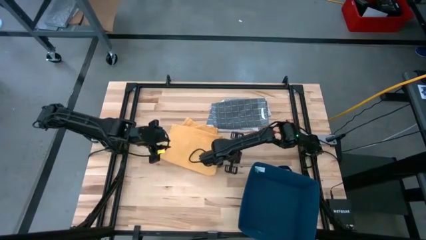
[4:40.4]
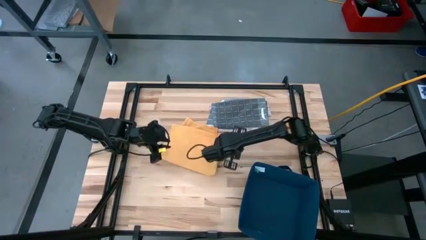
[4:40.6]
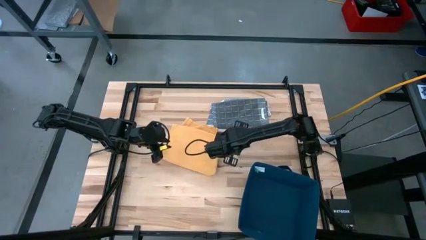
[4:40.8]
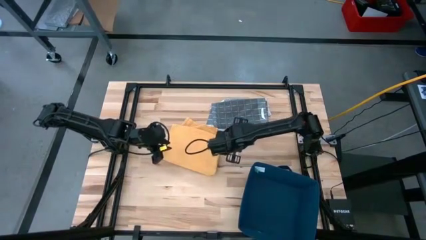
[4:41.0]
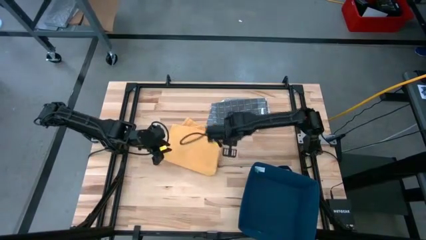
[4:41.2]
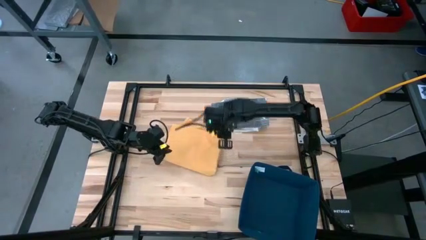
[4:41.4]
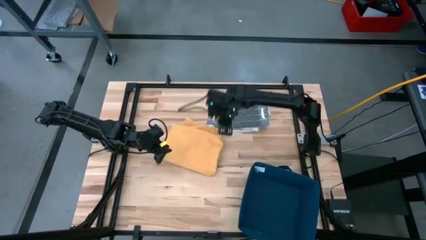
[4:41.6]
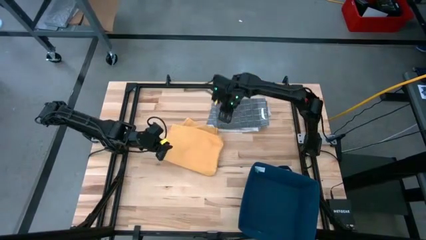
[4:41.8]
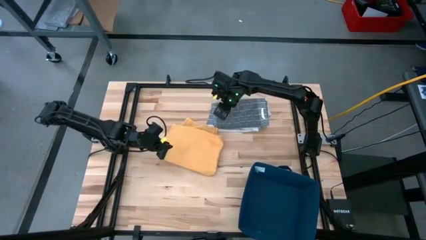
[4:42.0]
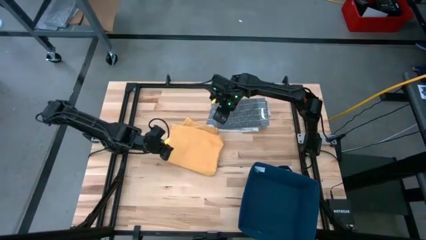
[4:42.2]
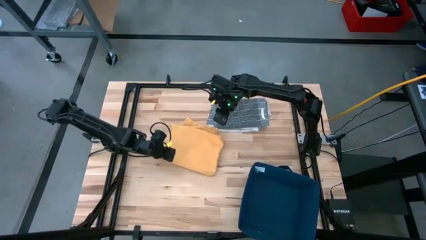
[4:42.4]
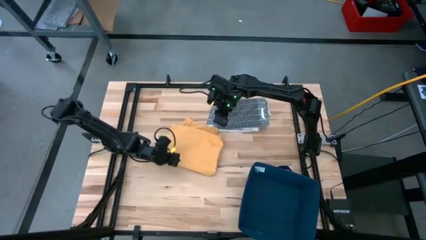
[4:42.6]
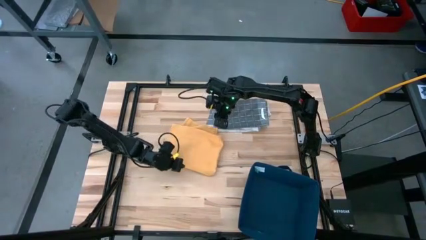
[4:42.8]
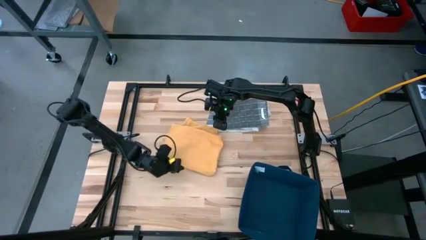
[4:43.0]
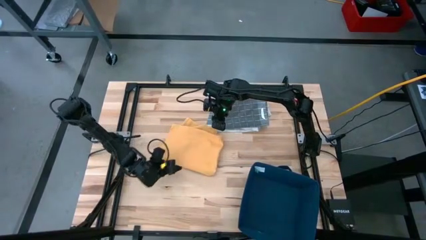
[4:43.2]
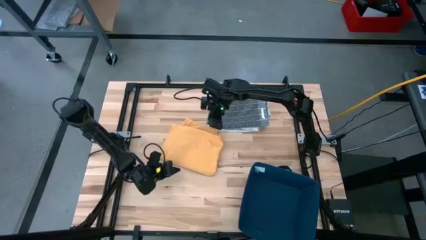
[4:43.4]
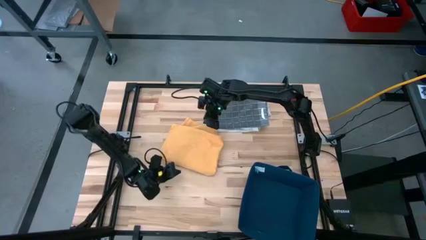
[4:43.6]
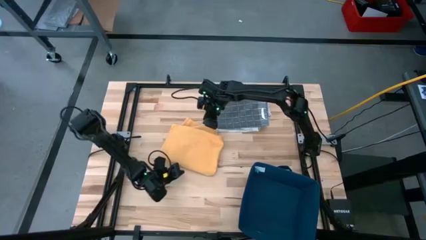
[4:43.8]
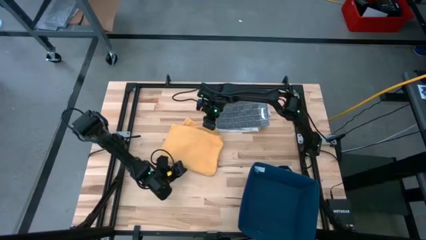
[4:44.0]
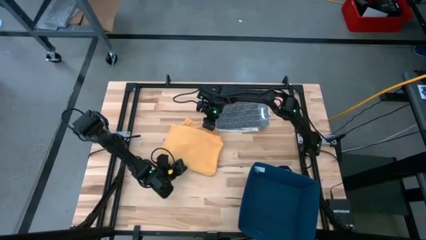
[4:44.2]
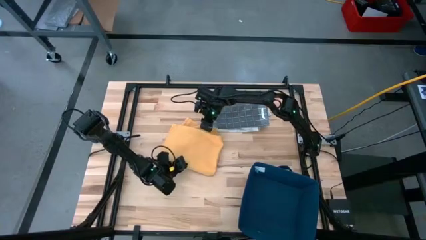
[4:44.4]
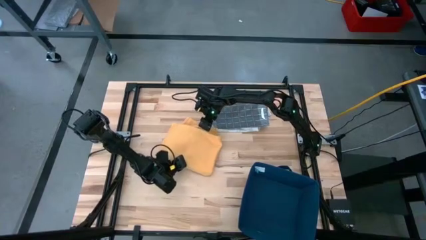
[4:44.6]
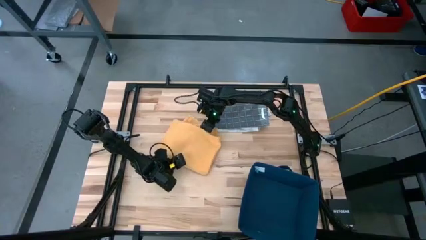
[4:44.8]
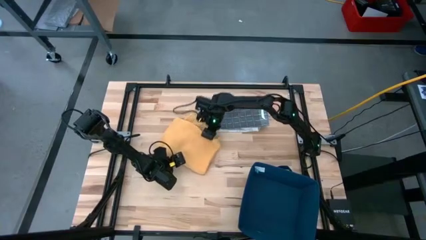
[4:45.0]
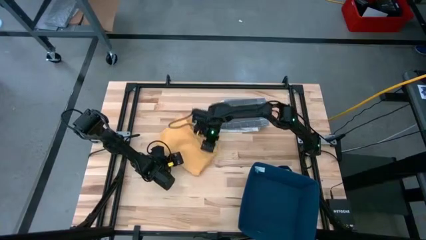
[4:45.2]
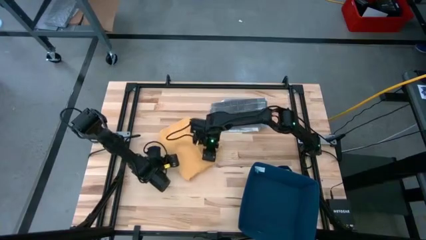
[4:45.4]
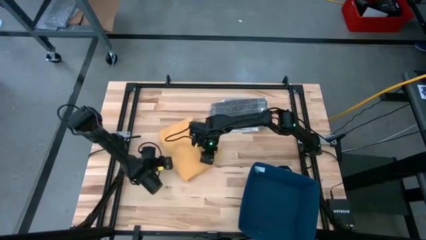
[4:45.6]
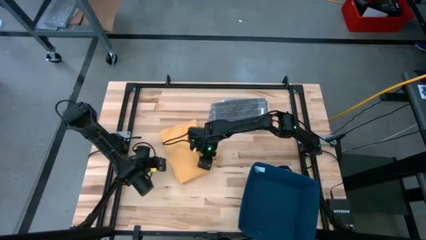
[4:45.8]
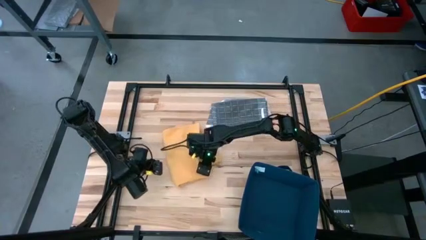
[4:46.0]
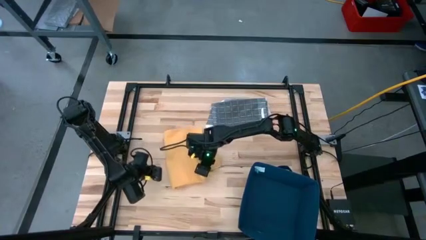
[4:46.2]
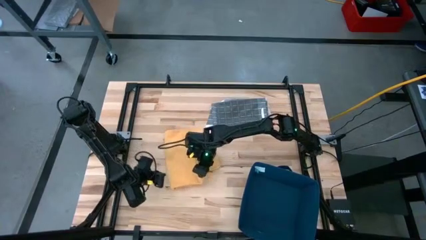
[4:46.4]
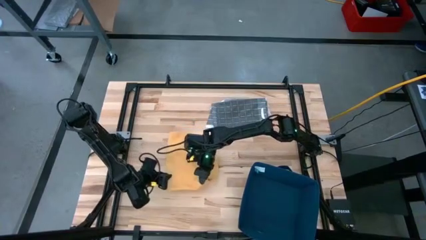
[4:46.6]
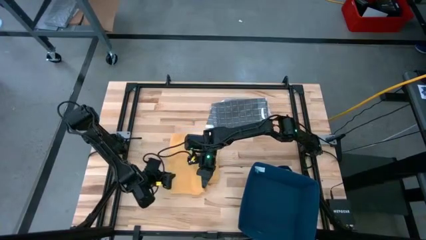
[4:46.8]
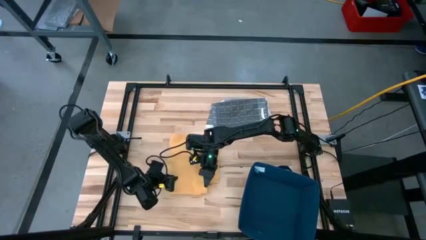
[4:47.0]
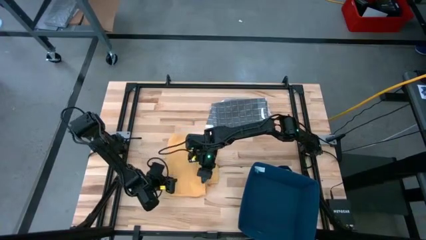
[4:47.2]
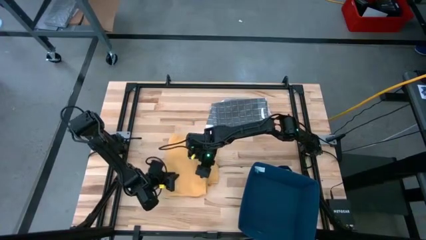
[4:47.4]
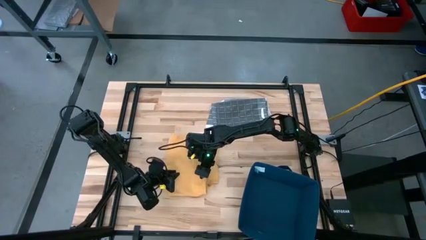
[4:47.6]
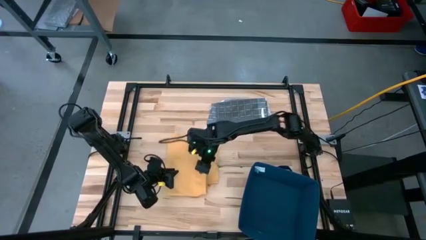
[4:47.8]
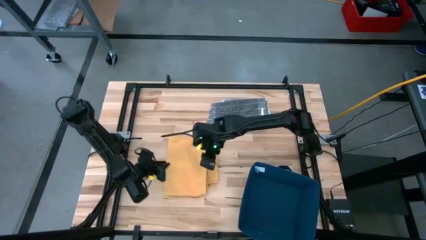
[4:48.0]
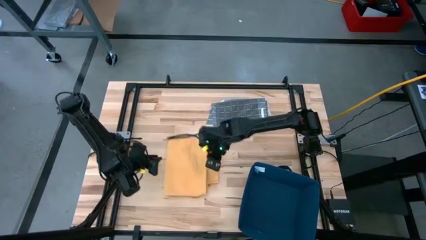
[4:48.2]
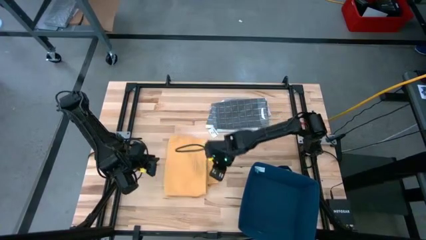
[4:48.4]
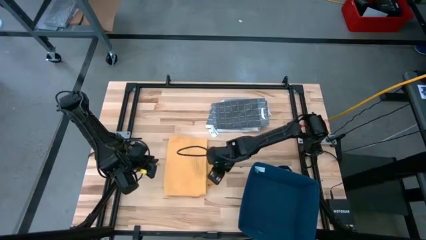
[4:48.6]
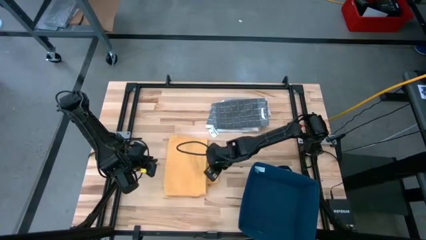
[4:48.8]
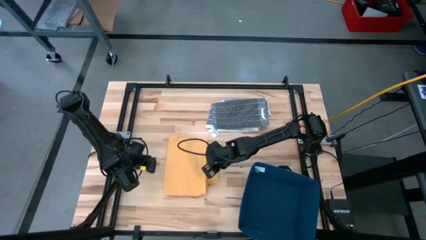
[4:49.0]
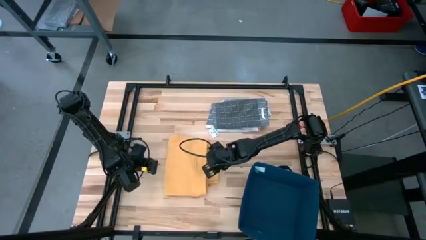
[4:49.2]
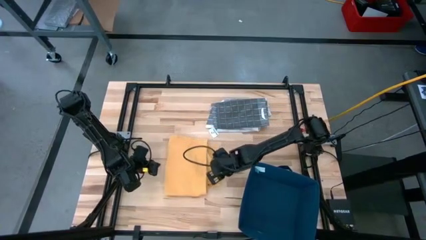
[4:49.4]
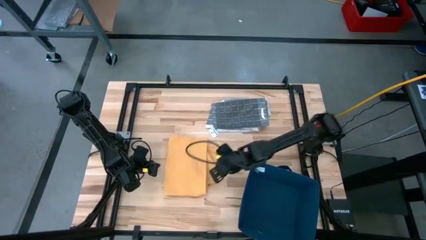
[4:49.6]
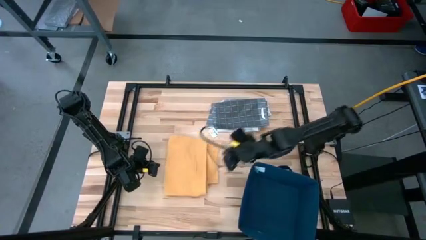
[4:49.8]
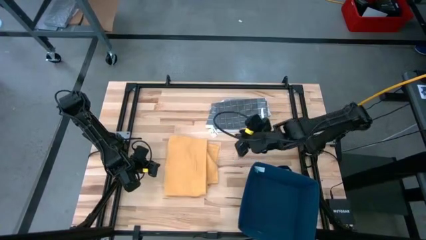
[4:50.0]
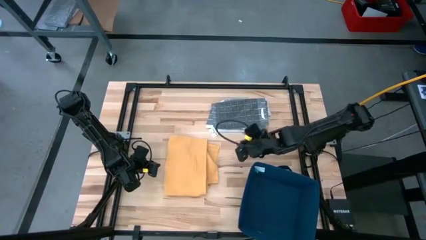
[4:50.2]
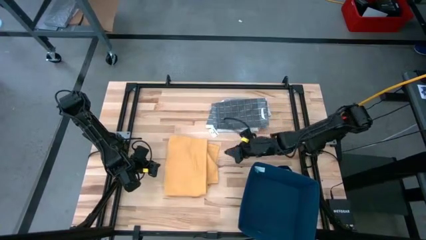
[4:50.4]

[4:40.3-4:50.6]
Task: Fold towel
Stack the yellow kitchen towel onto the gray kitchen towel
